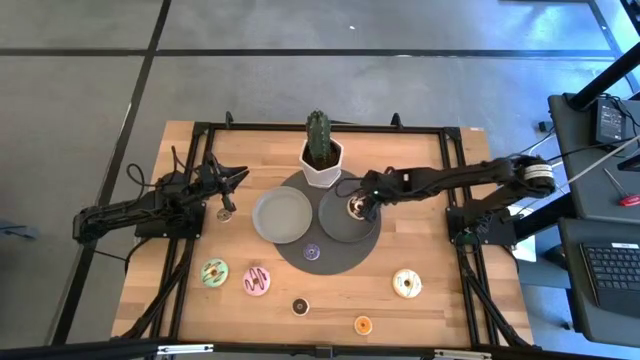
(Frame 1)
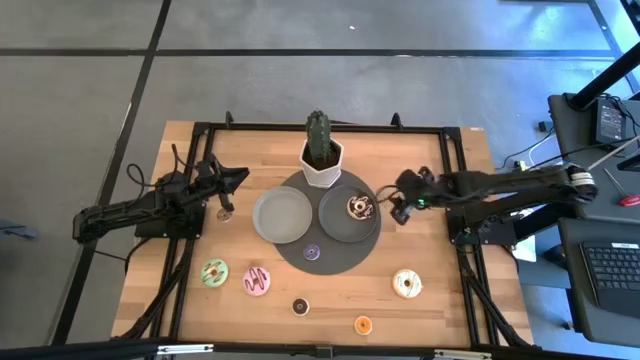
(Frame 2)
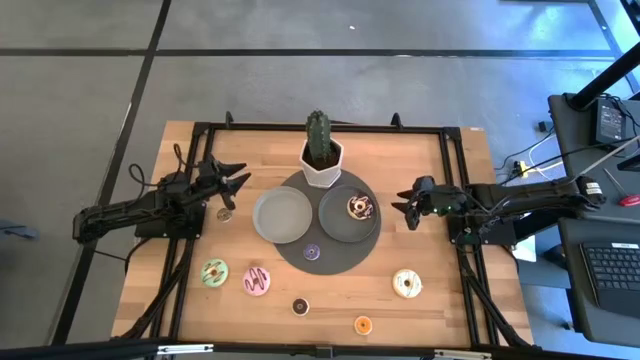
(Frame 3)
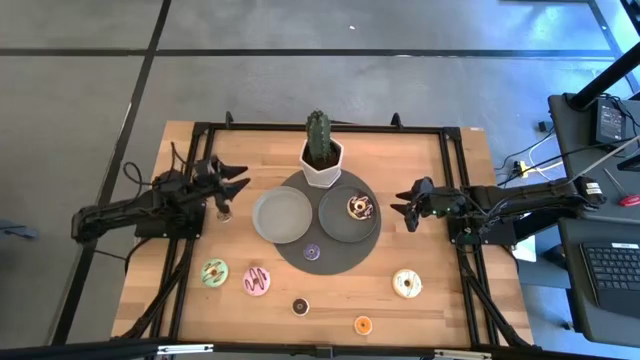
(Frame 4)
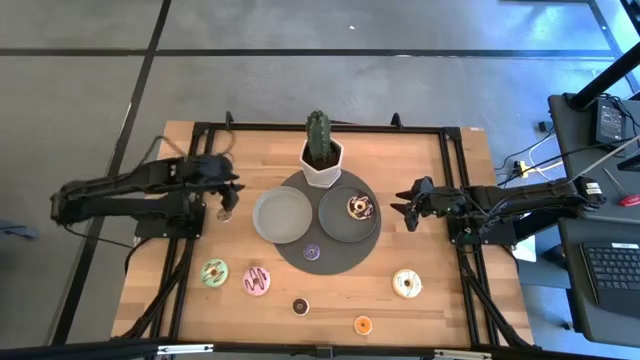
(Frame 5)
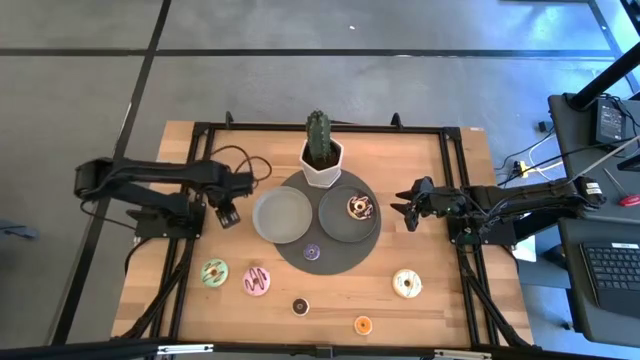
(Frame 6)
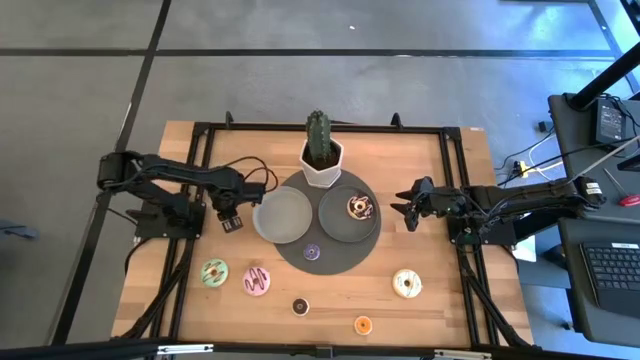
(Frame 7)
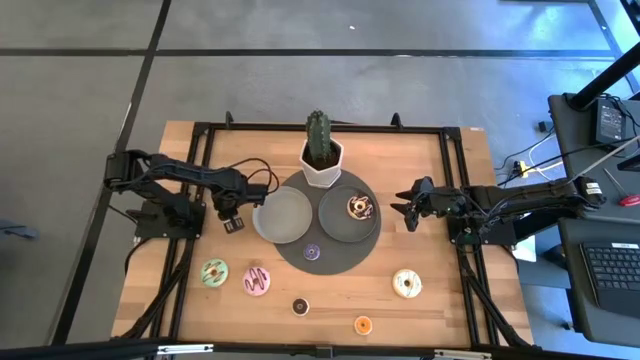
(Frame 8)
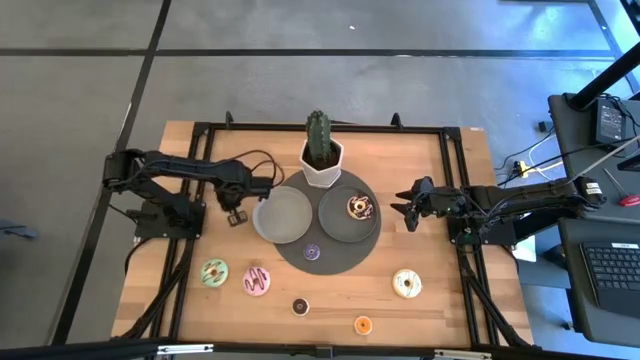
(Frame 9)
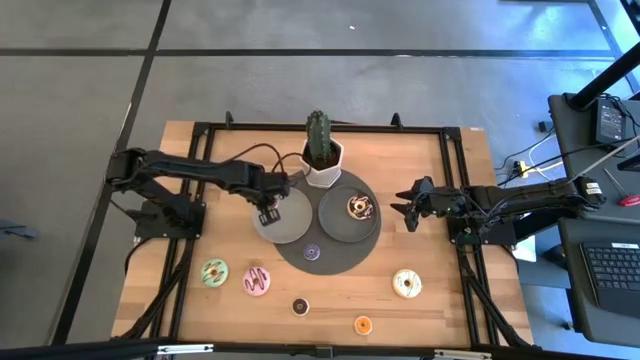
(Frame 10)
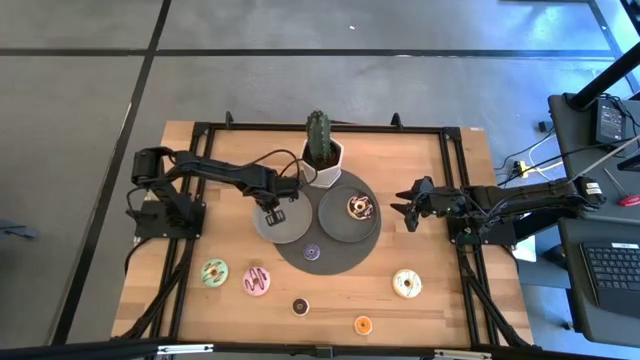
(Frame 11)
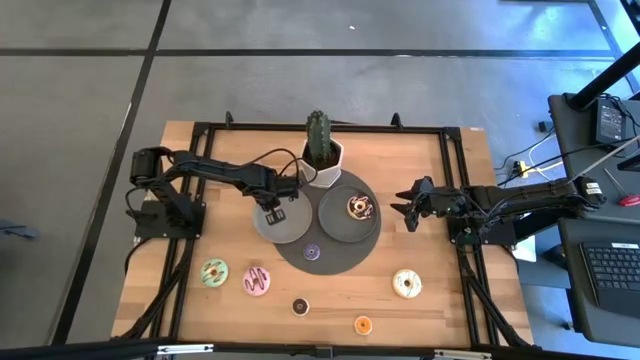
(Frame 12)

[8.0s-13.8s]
Task: Pick & Place donuts
Put the small brown donut on the light gray plate

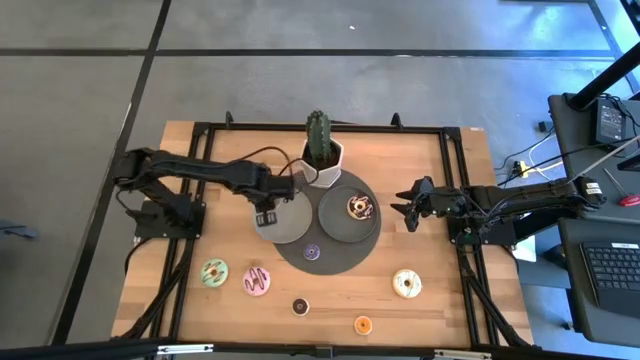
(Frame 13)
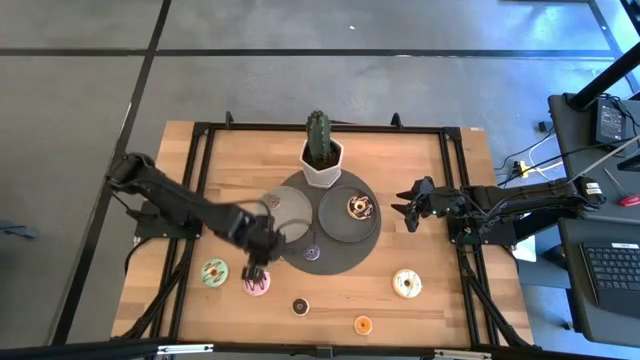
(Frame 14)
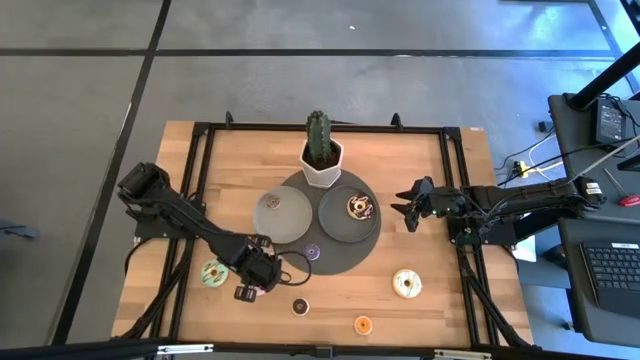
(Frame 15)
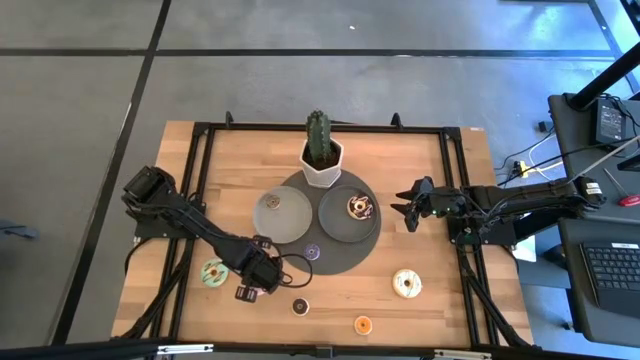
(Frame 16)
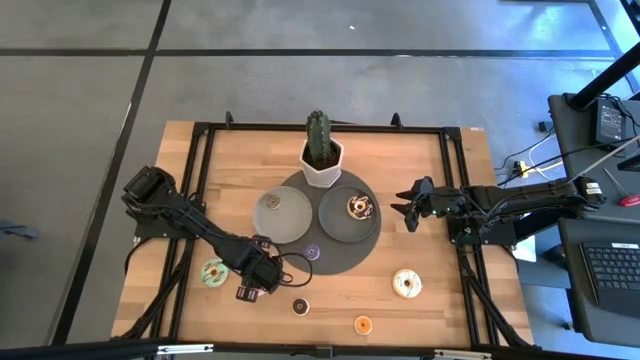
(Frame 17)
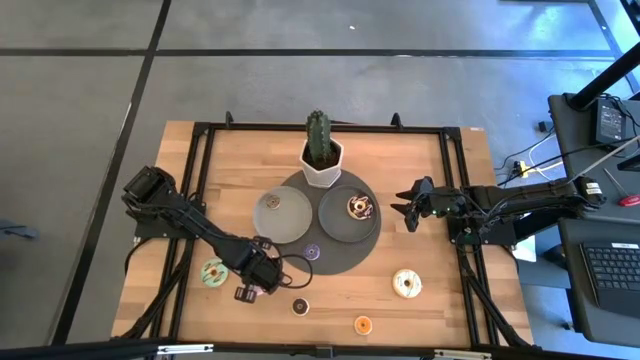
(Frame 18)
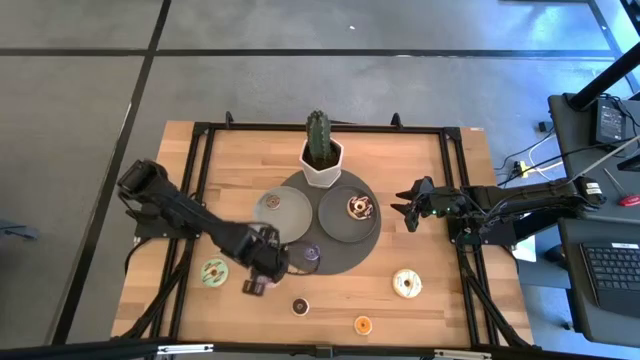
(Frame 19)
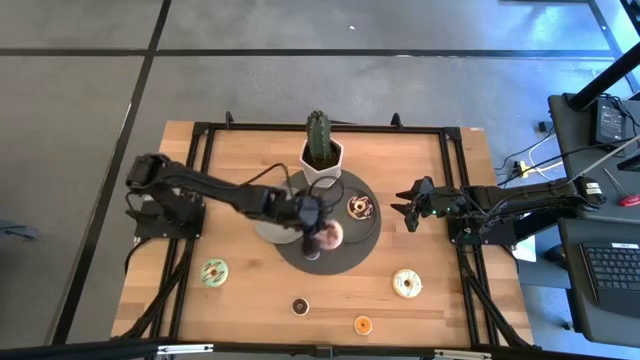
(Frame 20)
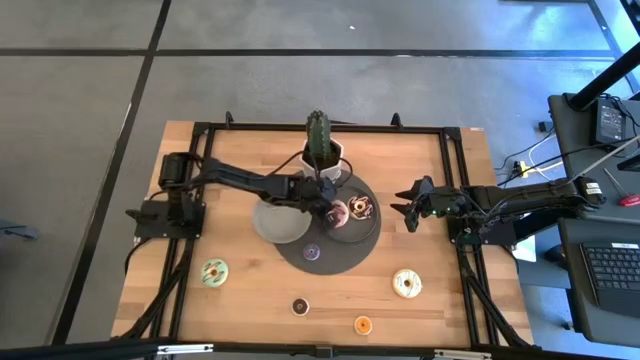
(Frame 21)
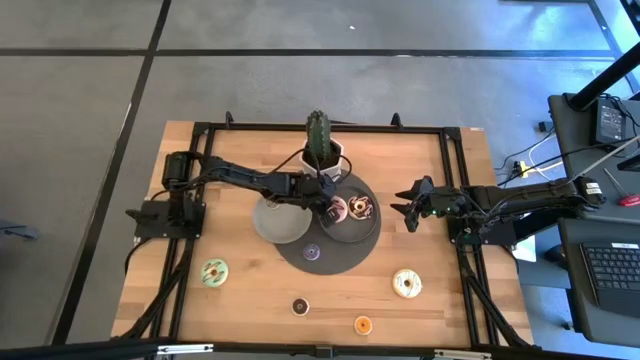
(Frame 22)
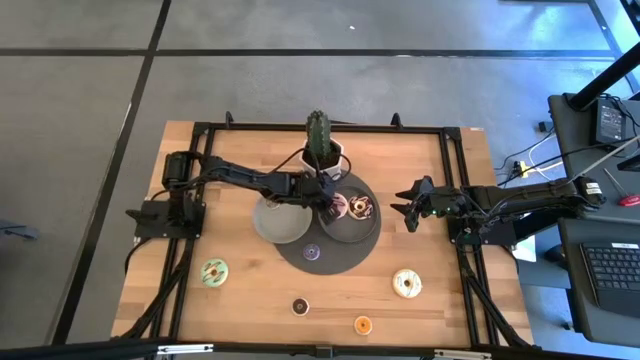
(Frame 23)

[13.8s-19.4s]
Put the big purple donut on the dark gray plate

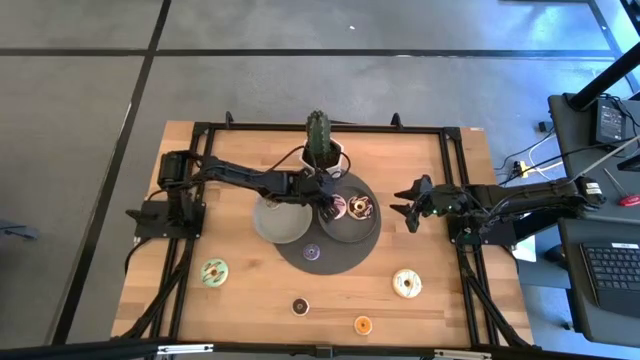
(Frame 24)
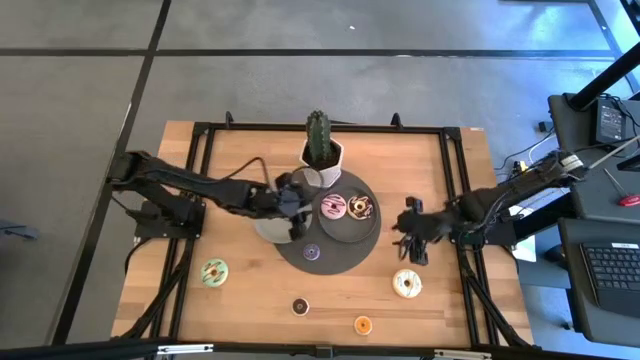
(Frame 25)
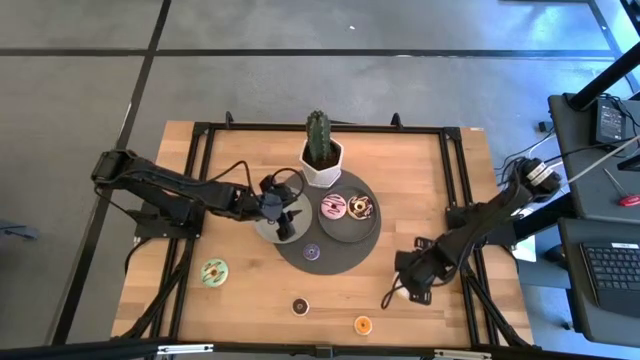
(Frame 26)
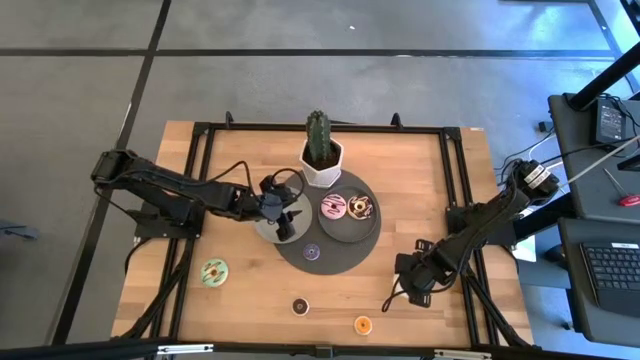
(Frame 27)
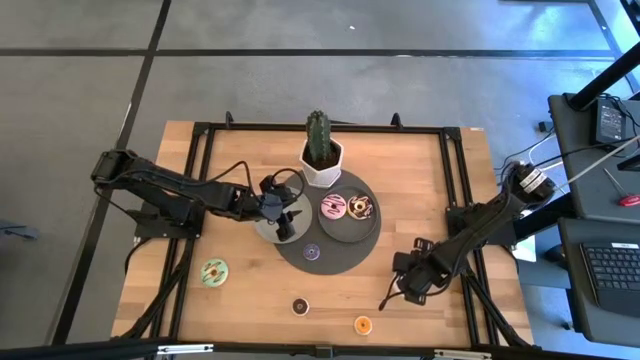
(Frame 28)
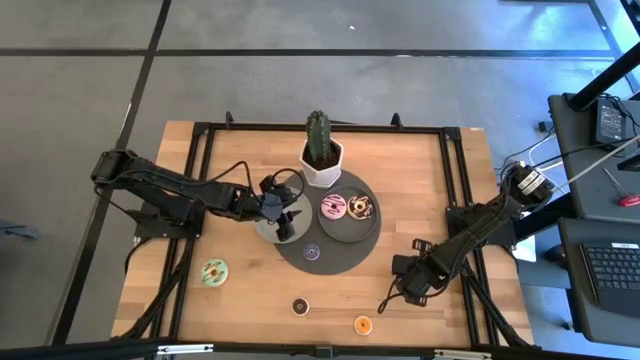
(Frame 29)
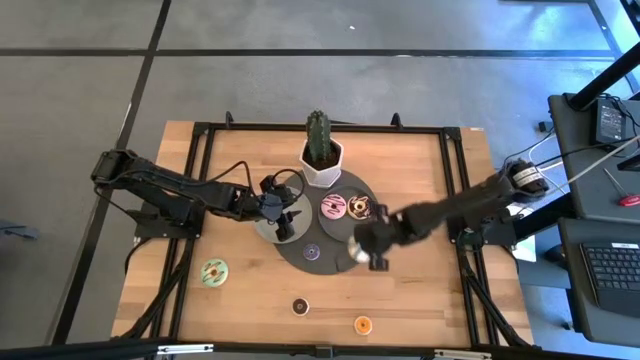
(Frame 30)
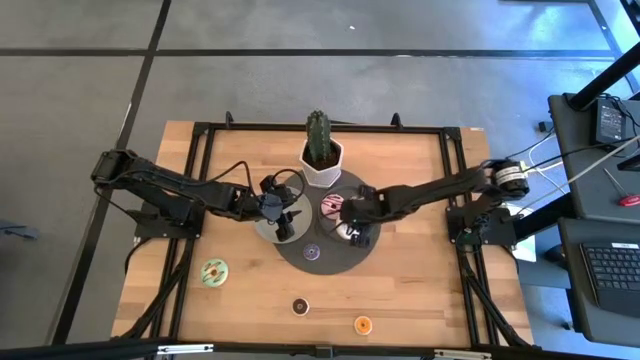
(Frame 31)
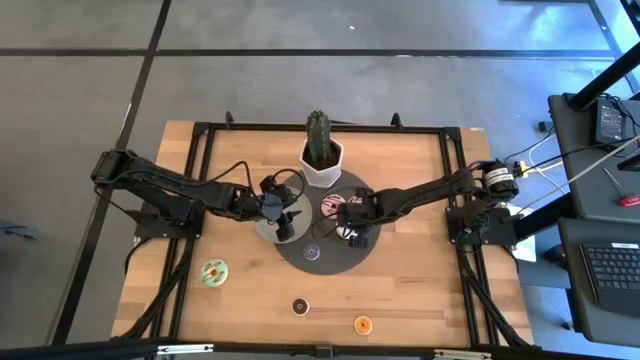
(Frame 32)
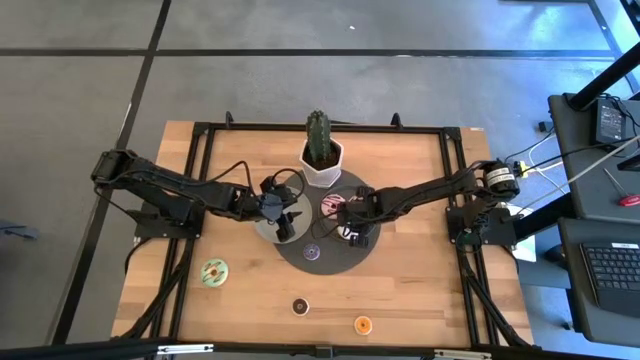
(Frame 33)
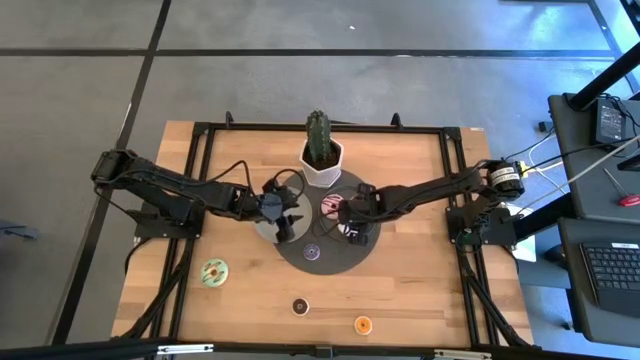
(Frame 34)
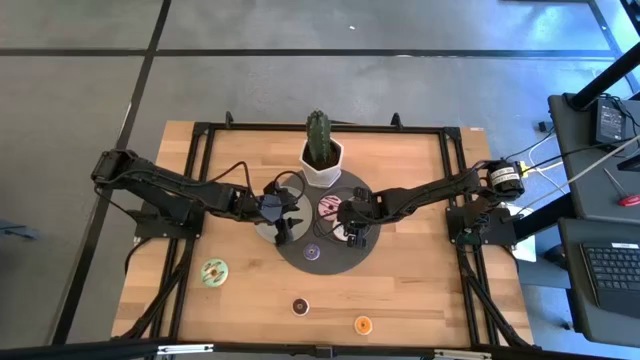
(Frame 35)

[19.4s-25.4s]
Put the big white donut on the dark gray plate

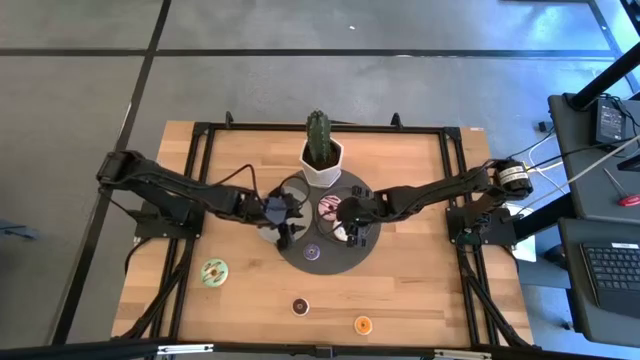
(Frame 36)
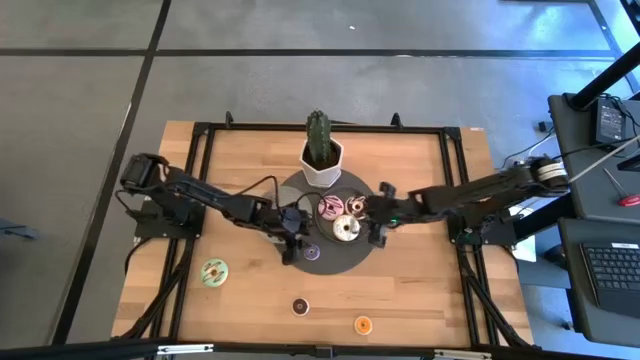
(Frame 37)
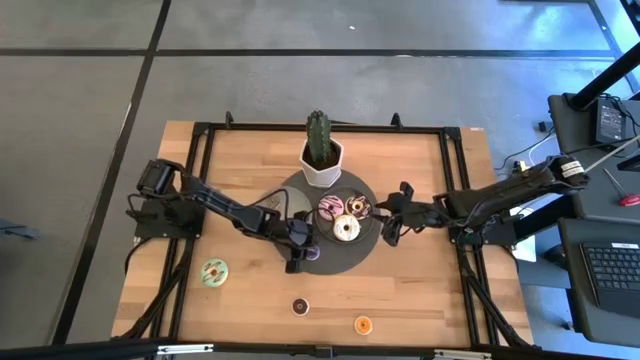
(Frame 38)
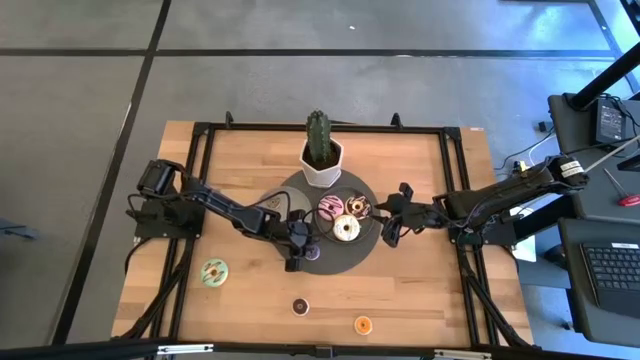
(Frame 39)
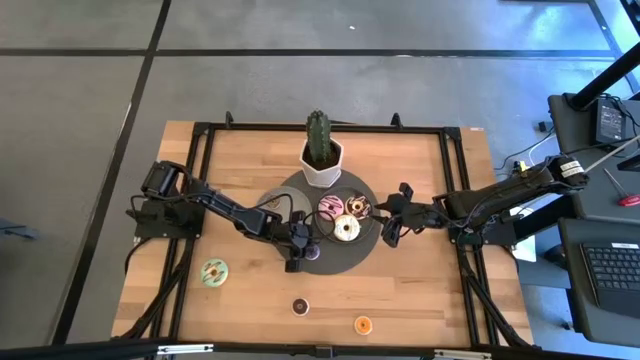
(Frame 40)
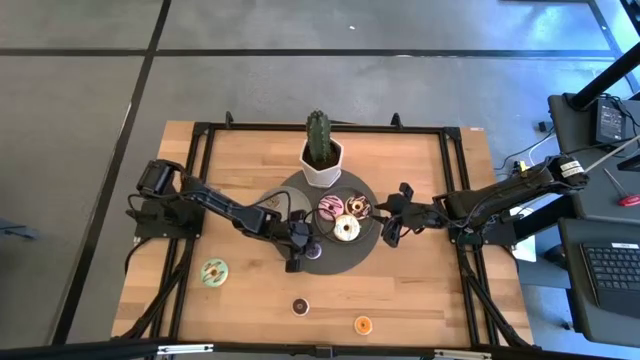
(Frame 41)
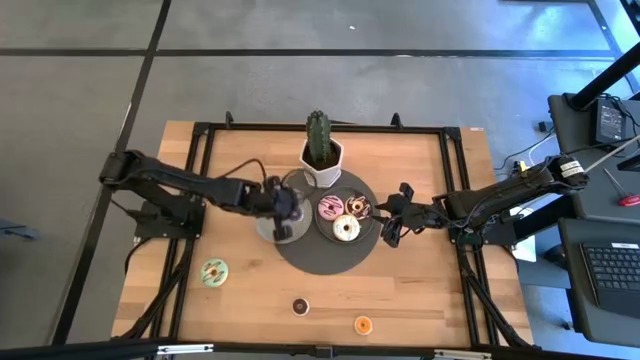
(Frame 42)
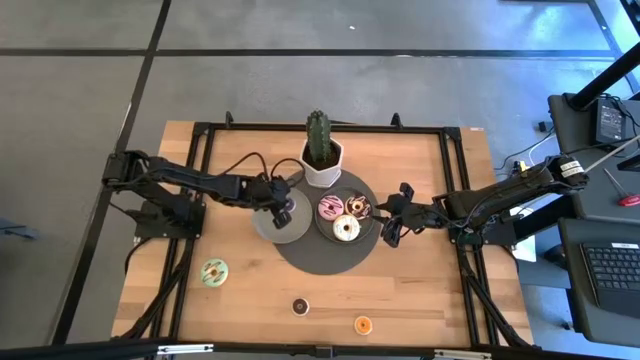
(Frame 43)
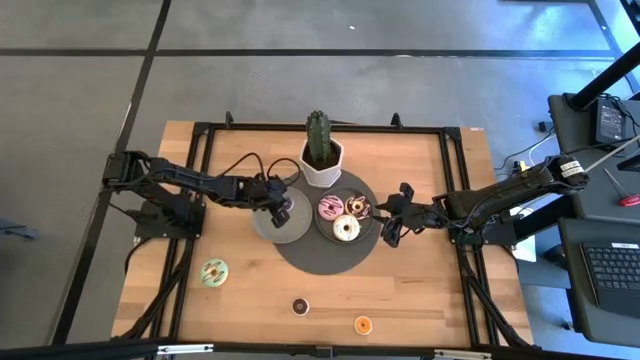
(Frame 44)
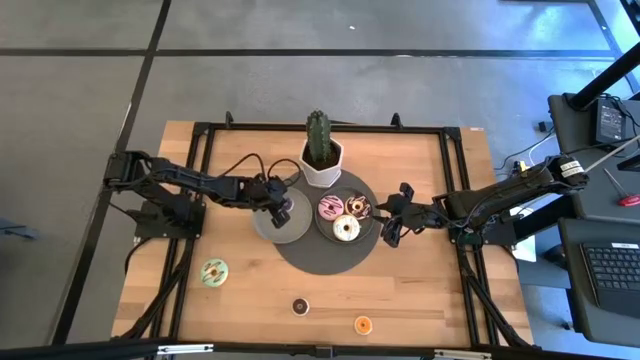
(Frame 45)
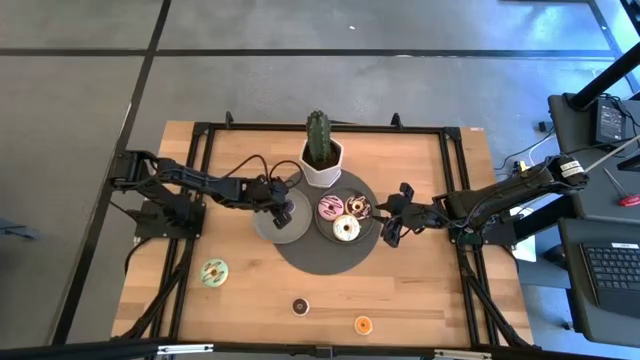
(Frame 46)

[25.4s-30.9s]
Put the small blue donut on the light gray plate
